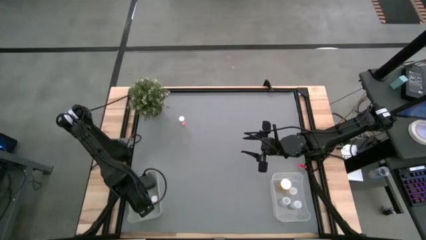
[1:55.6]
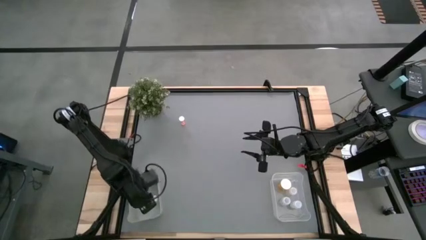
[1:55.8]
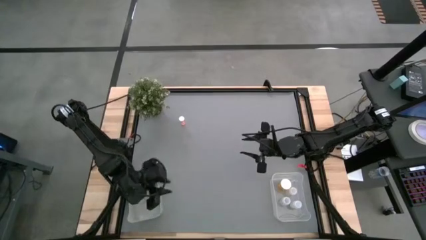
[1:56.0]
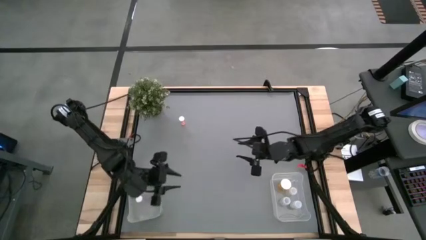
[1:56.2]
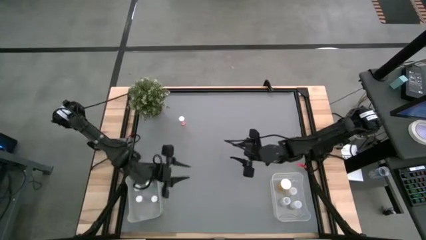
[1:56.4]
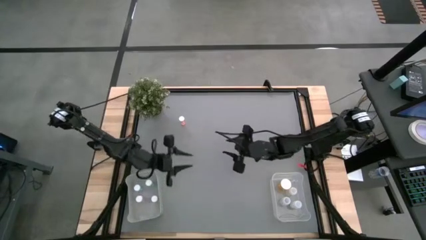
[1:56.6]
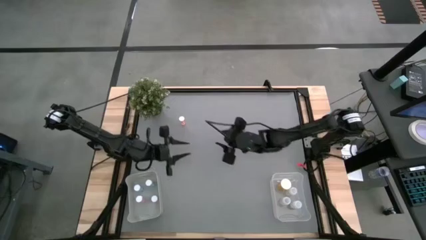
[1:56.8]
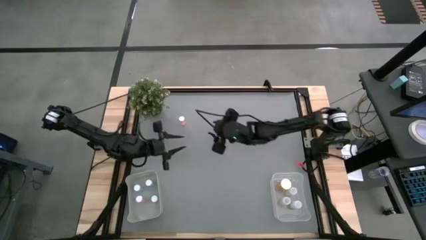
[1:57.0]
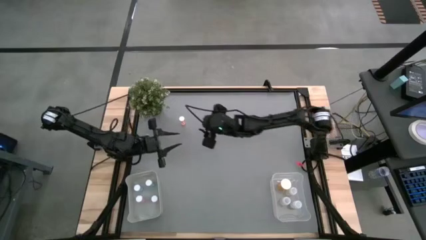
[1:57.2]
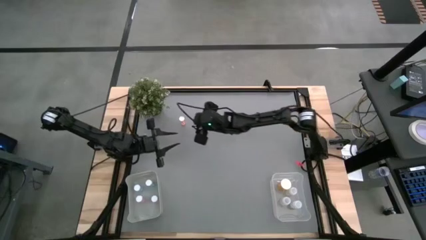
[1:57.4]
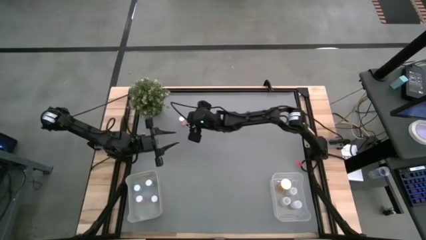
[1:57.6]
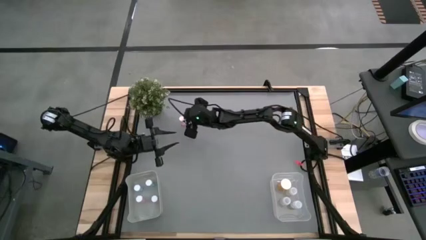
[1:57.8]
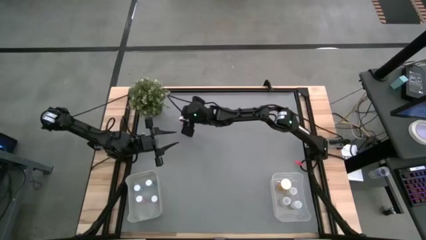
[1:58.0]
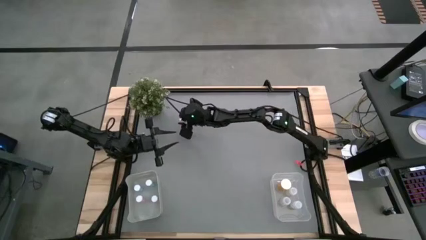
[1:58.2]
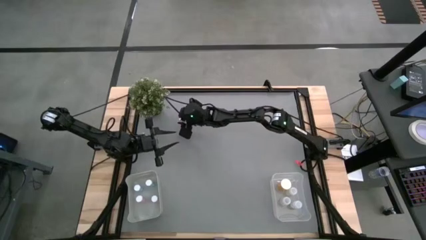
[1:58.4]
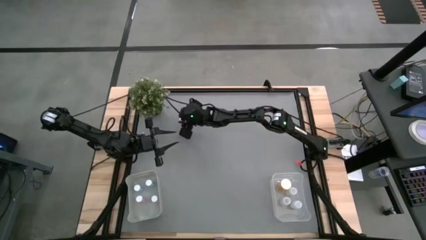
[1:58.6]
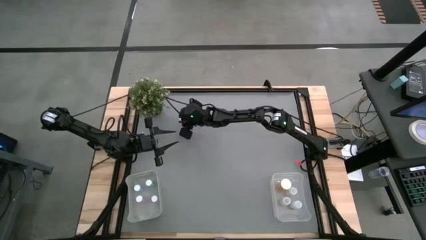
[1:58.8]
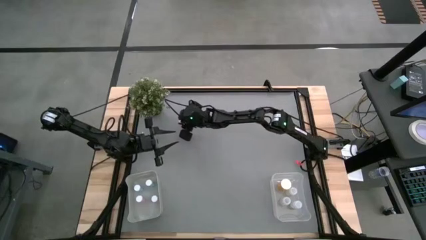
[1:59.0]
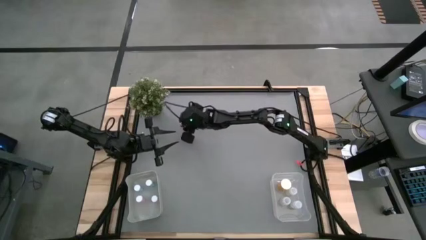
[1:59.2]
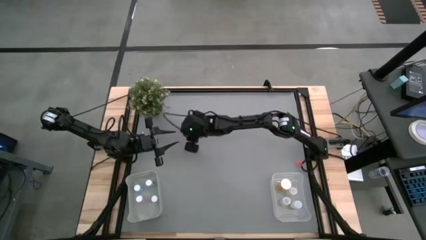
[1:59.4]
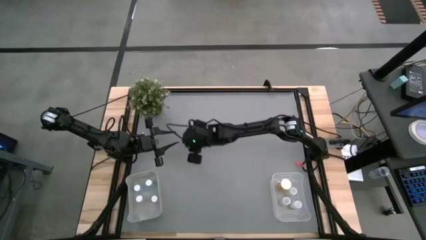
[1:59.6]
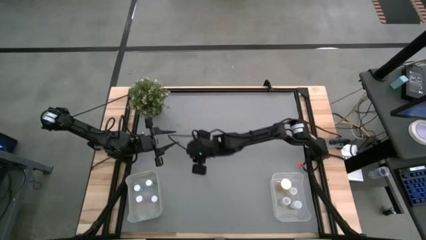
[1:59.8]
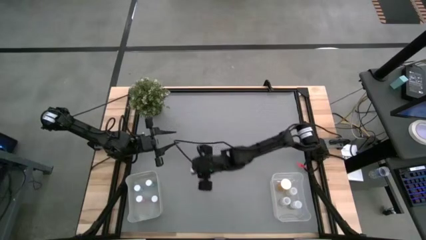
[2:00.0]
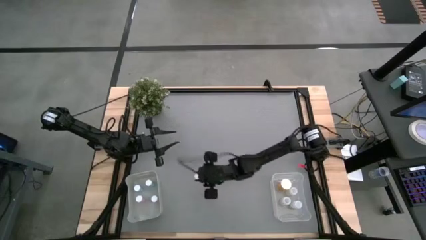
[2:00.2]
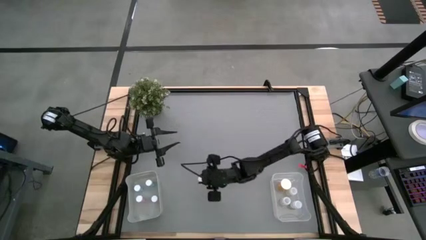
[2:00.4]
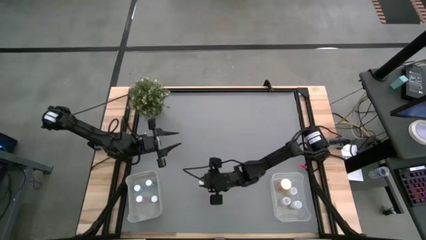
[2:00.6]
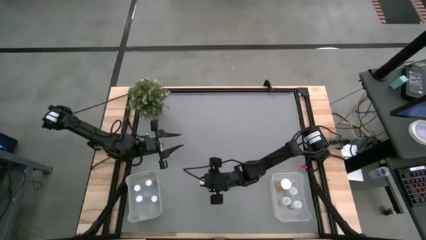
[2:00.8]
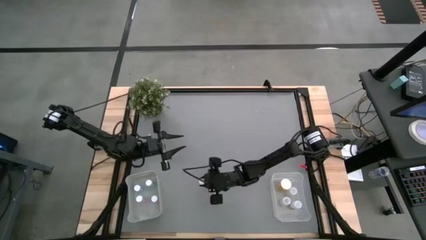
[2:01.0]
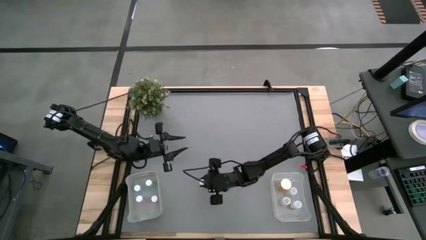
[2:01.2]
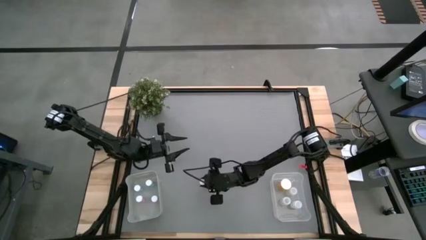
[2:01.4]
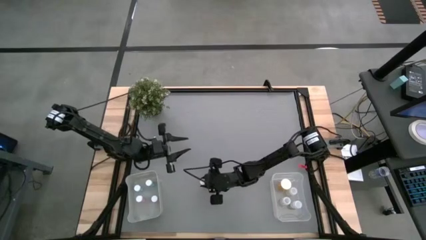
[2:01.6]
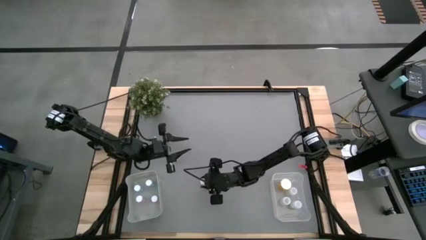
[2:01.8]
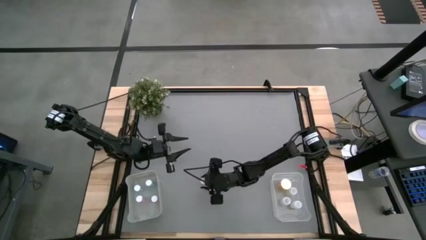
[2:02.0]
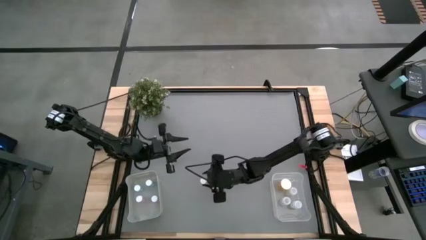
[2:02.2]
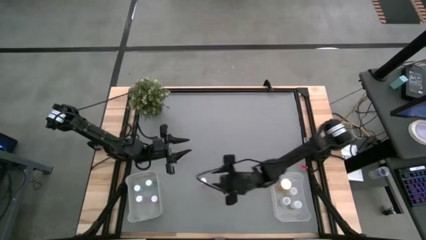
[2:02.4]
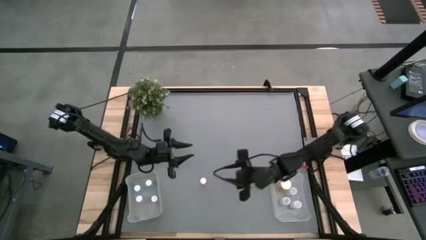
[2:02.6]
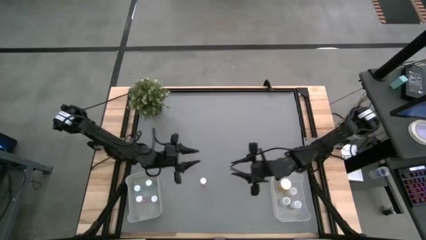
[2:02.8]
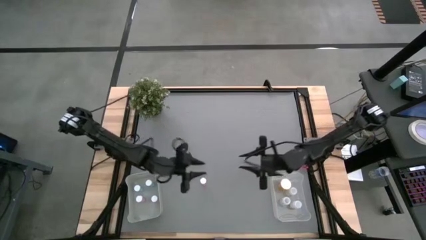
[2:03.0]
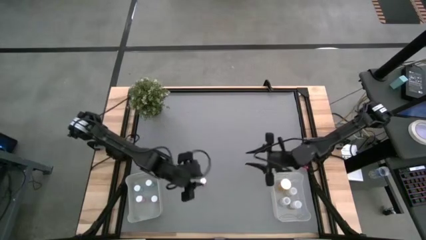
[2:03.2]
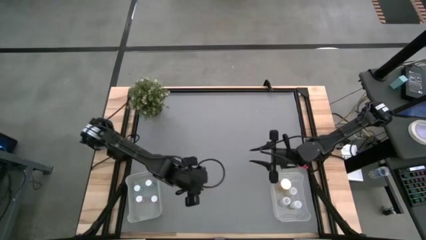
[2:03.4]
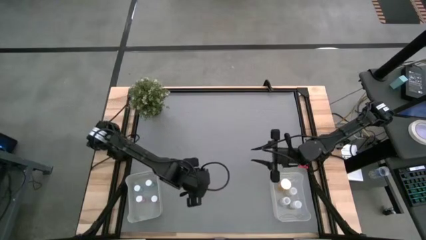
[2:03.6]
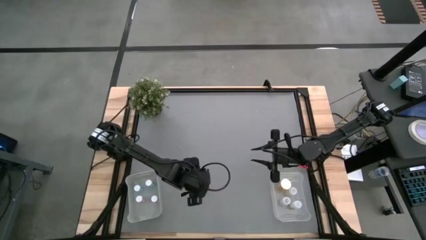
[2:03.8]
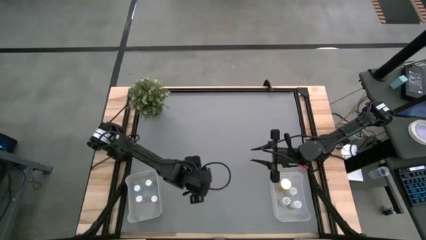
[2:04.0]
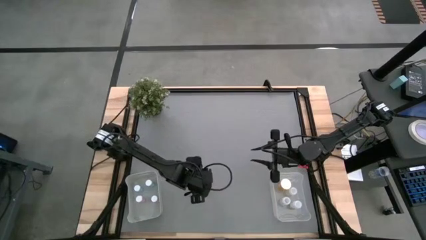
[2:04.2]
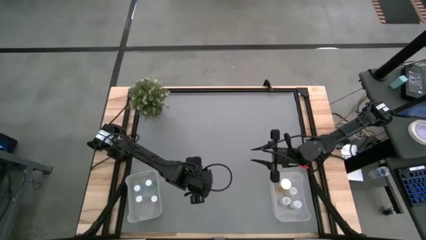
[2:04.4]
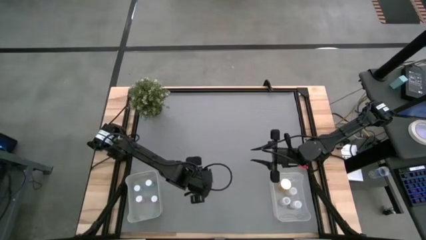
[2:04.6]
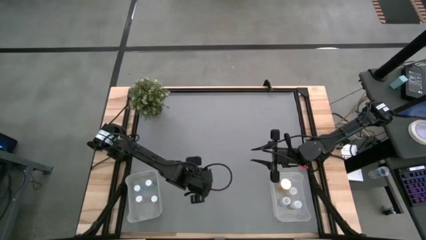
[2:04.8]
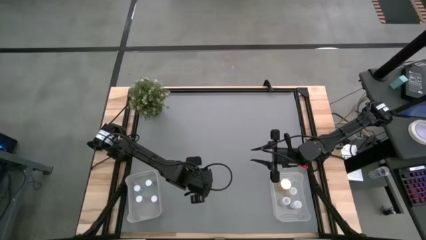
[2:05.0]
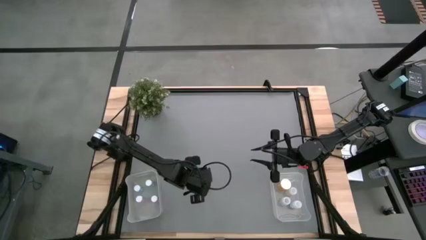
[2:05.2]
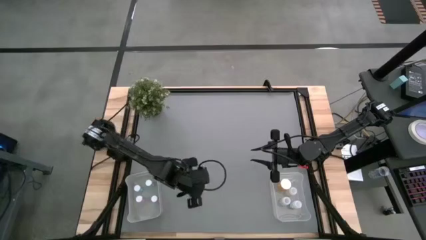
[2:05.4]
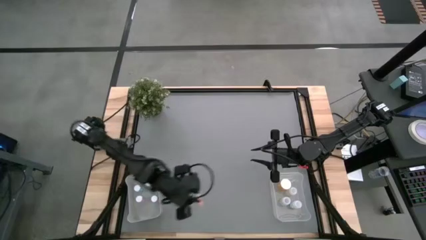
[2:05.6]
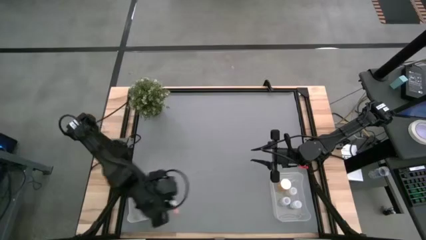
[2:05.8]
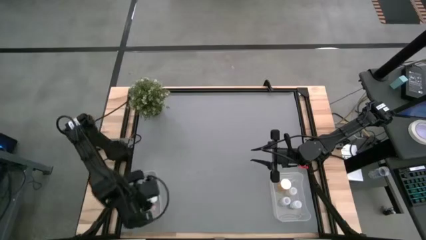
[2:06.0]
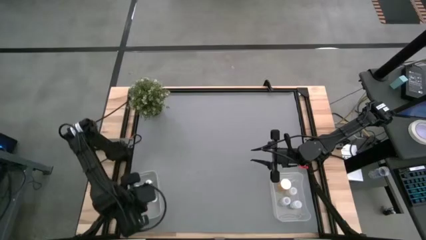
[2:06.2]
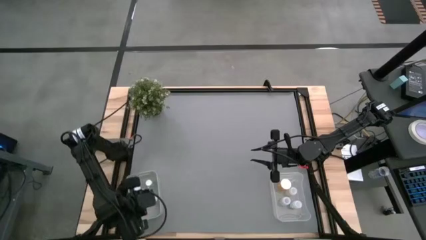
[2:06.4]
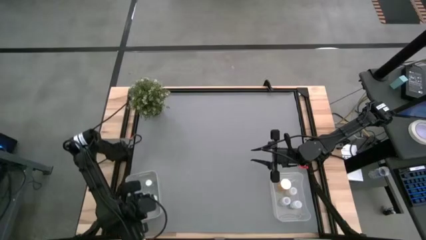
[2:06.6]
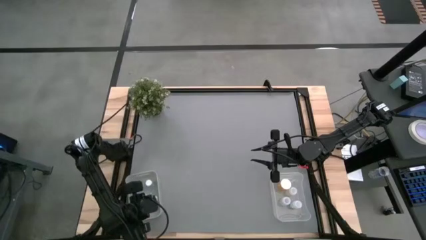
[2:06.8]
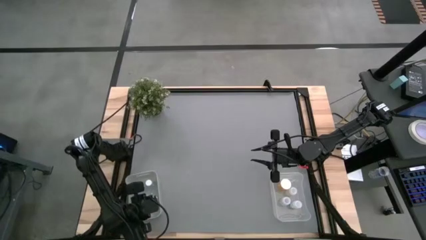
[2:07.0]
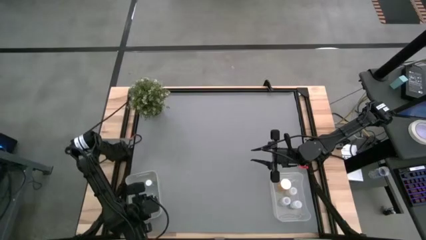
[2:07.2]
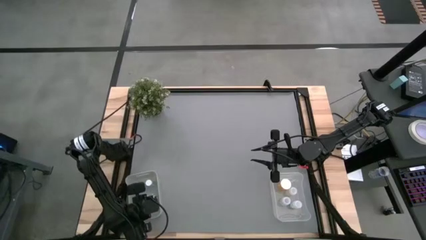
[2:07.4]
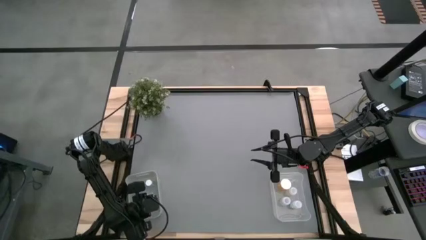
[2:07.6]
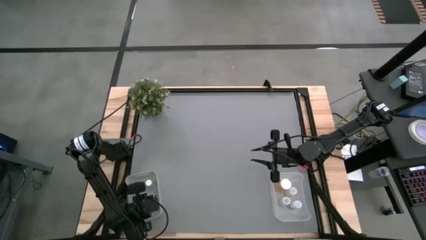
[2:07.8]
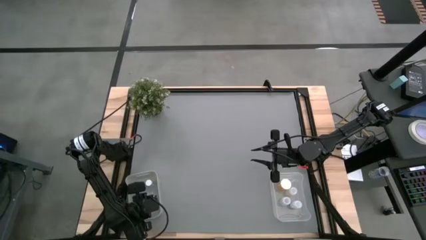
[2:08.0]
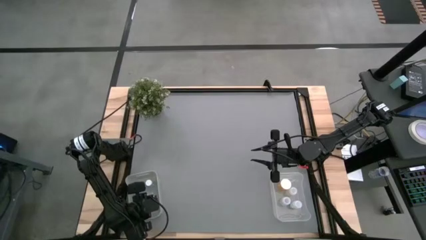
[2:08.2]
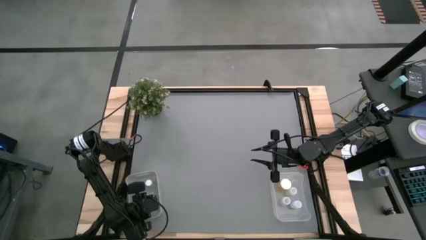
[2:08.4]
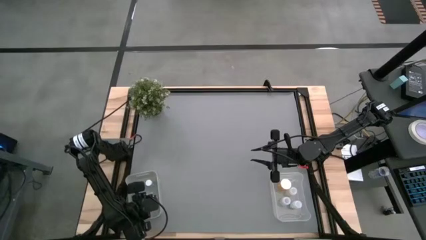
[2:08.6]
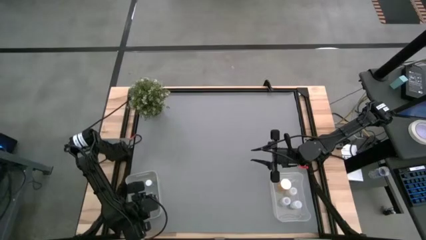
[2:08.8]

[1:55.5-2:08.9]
Task: Pick and place medicine bottles into bin by pill shape (circle, oval)
Put the orange tablet bottle into the gray bin

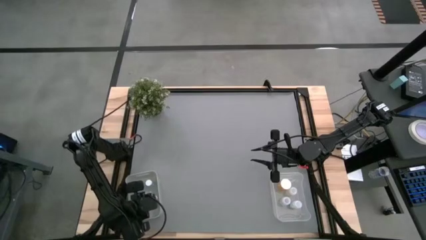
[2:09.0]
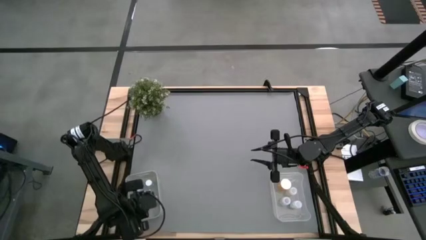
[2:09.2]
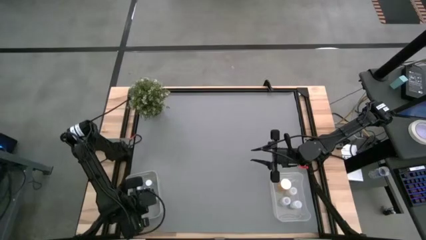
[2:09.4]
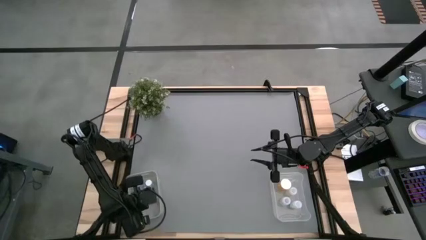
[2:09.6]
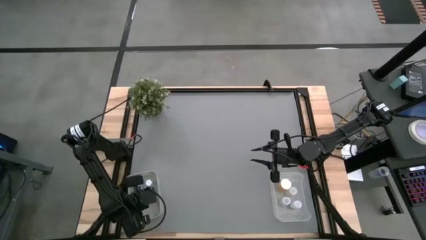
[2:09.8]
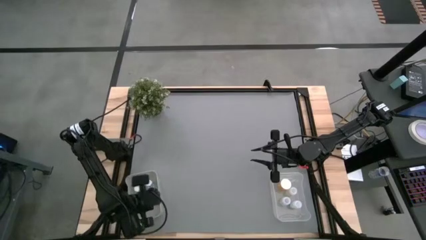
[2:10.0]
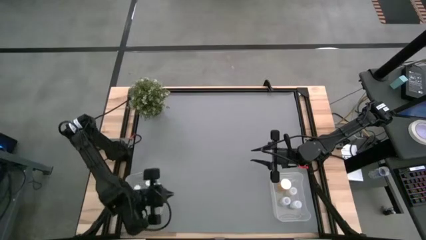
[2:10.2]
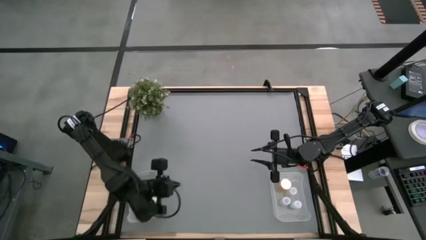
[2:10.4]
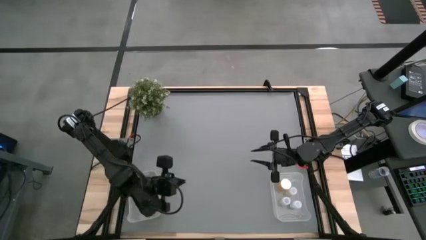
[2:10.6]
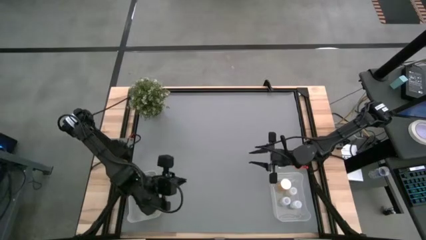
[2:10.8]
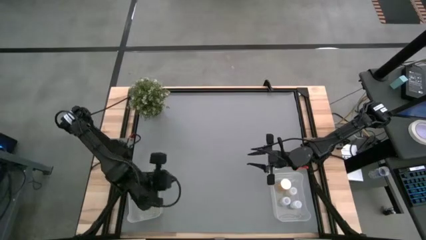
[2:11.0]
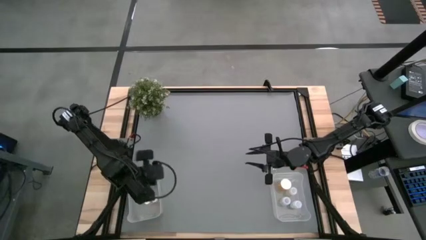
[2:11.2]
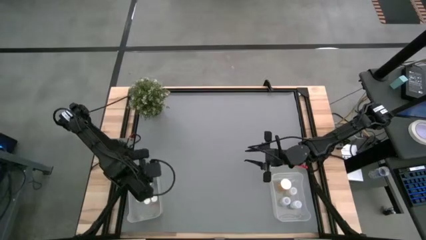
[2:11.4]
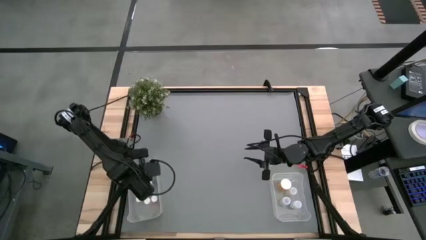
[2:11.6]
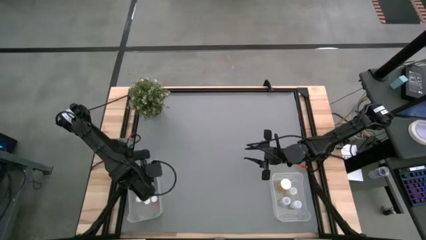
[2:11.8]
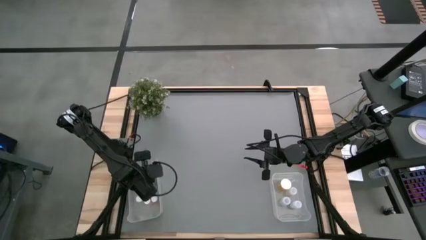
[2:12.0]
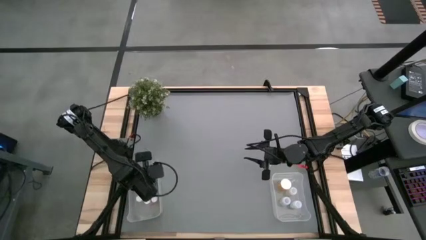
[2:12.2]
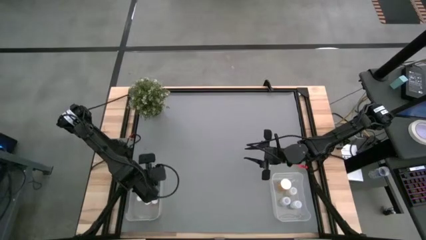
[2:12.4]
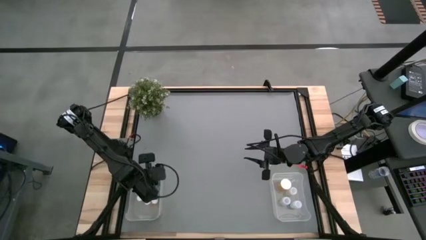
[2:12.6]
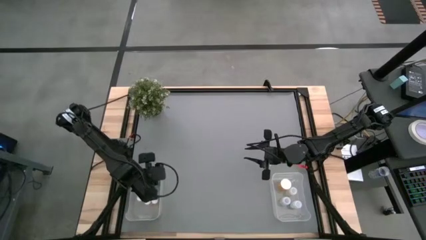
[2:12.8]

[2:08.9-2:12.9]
Adjust the gray bin
